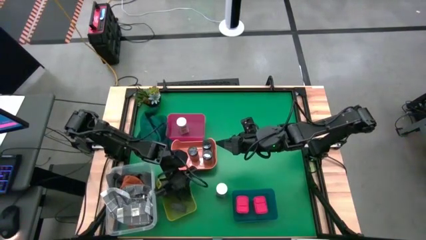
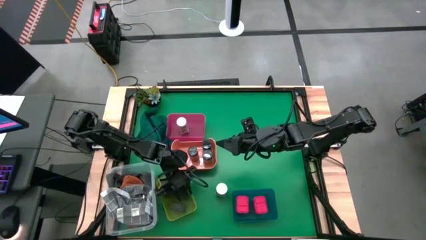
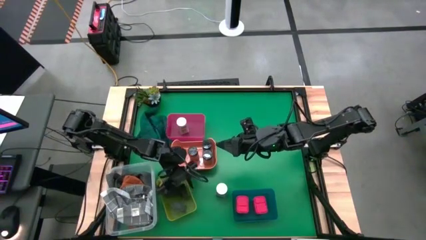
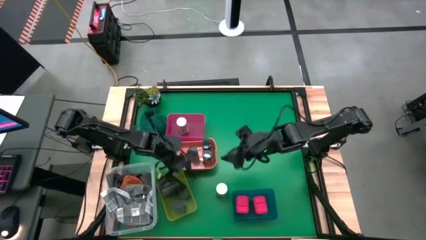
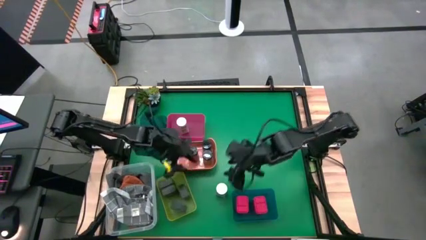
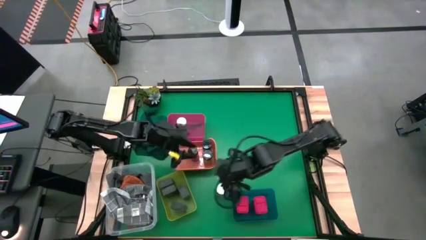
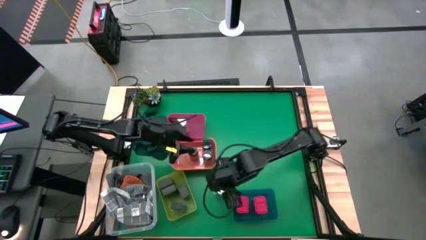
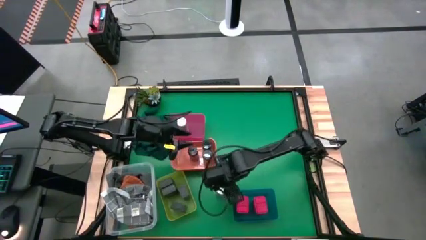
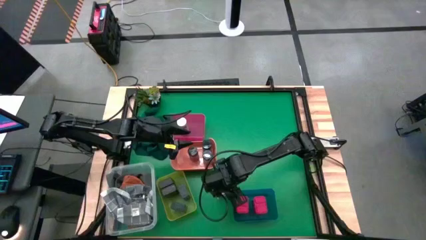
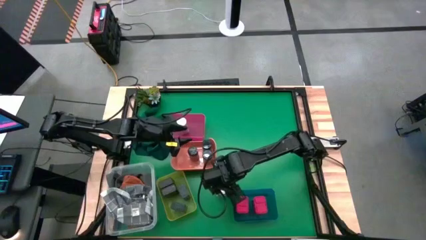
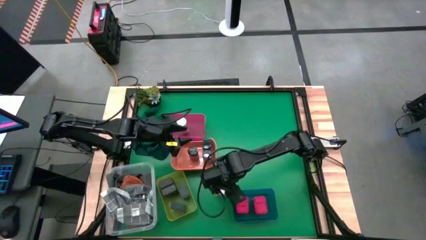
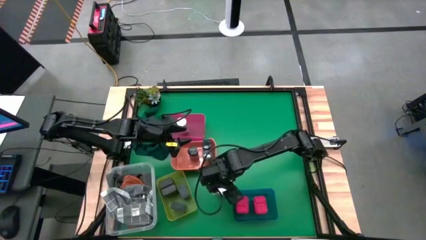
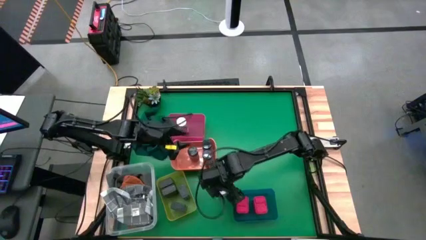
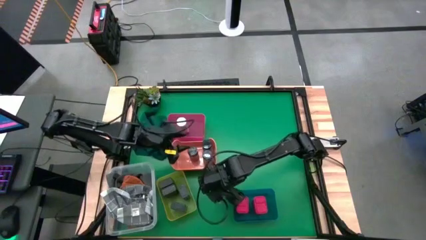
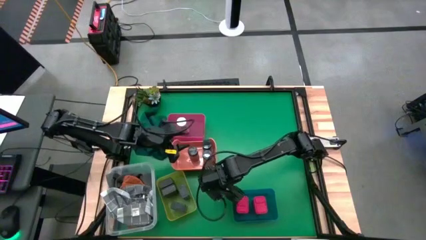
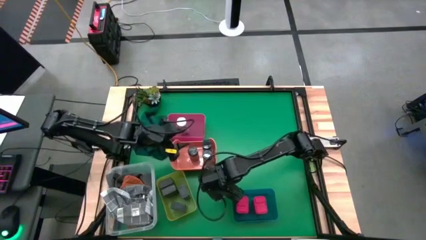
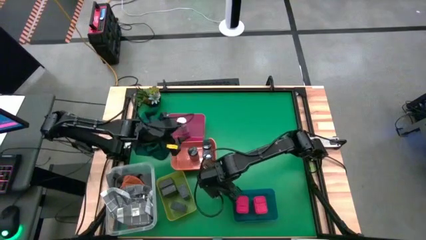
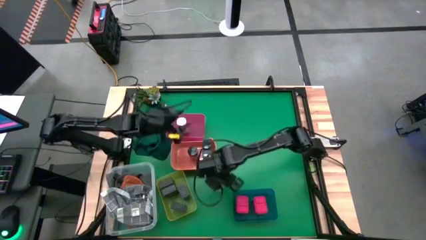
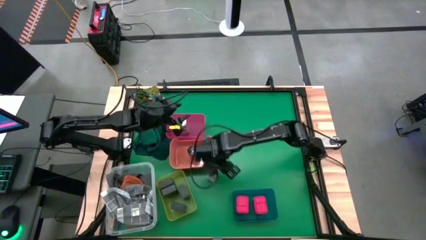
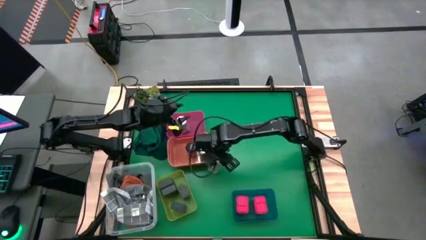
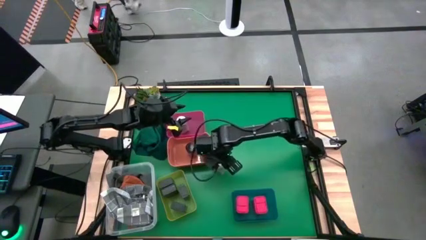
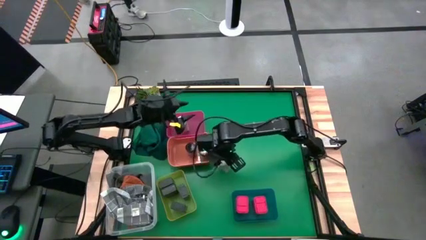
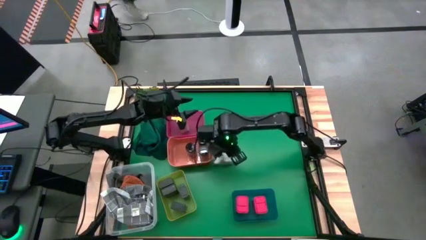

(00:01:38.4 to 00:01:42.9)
Task: Sort spices by type
Put the white seasoning bottle into the red bin

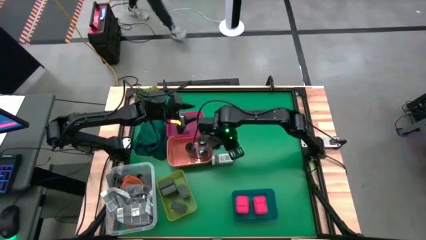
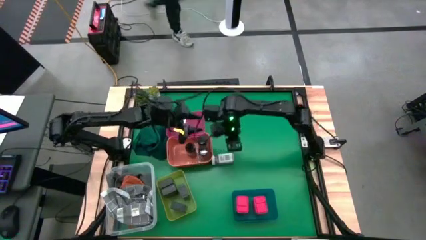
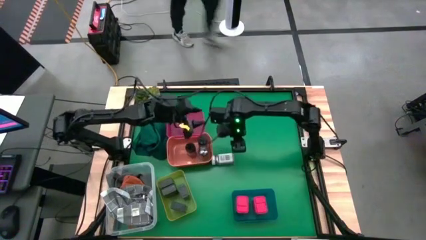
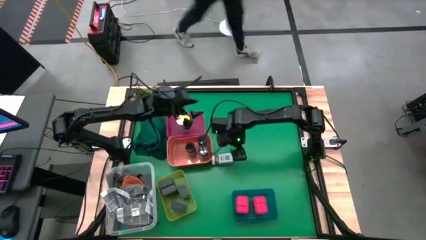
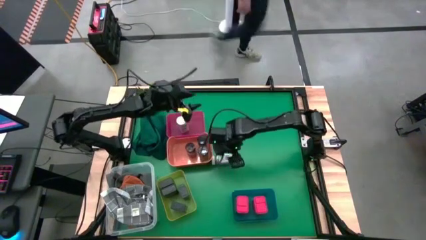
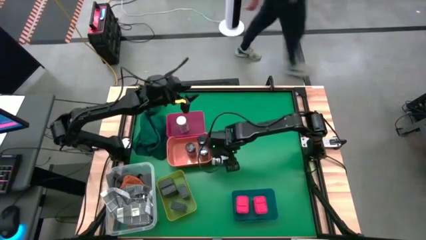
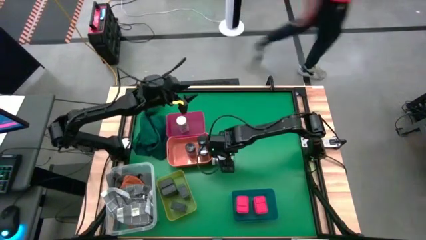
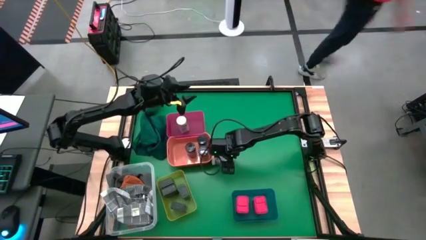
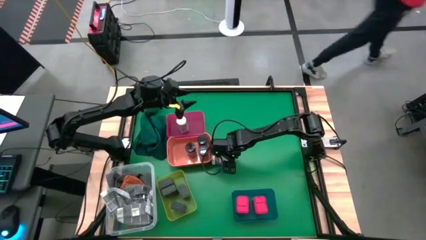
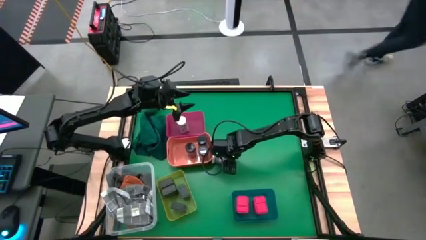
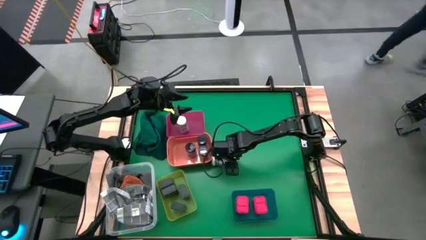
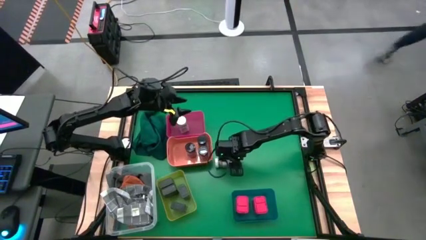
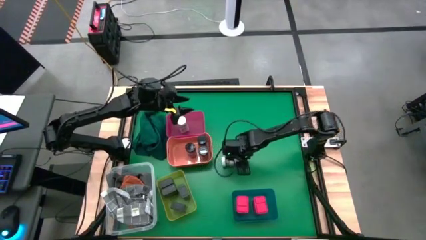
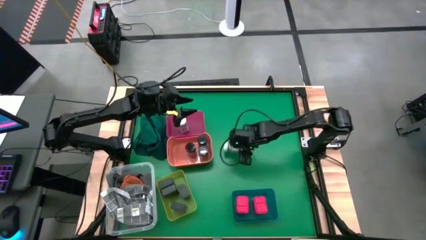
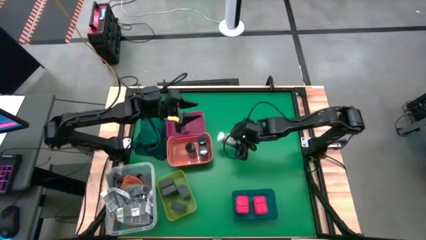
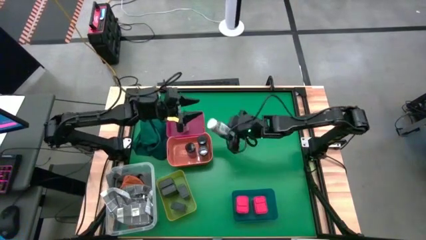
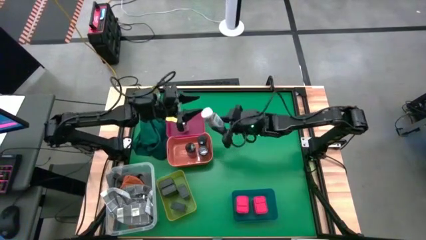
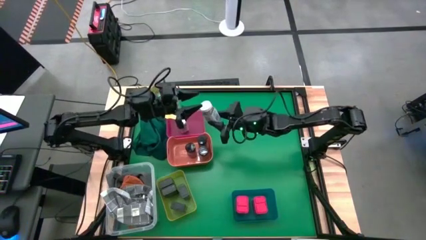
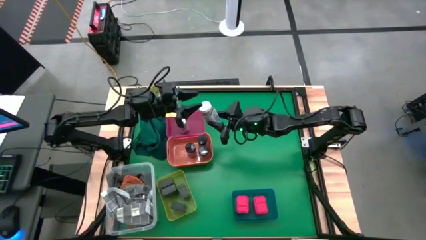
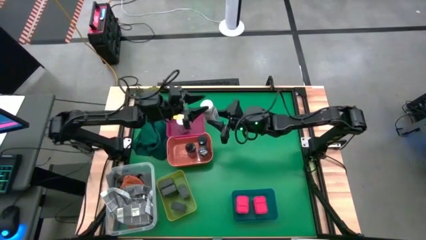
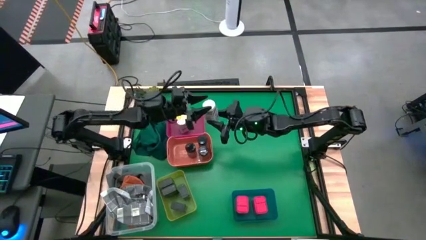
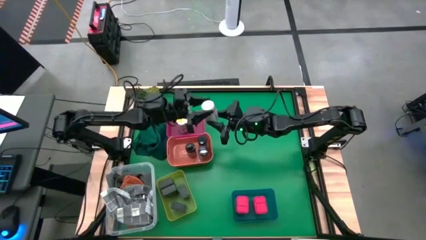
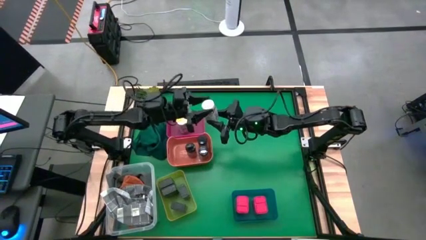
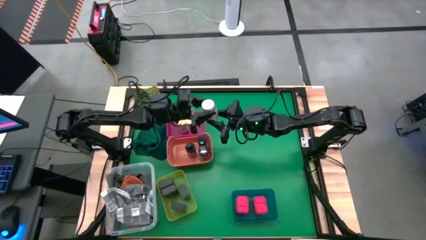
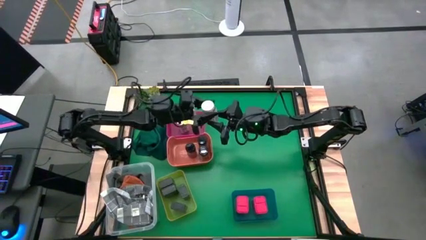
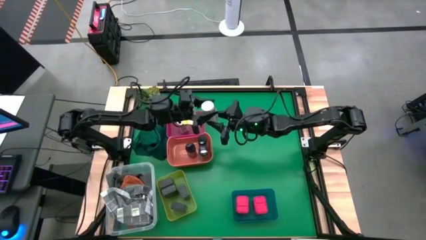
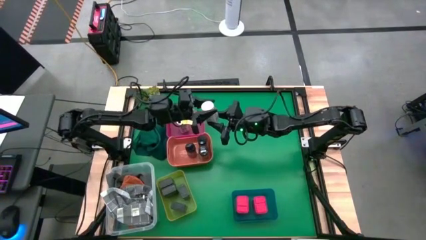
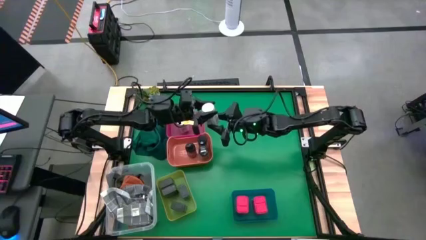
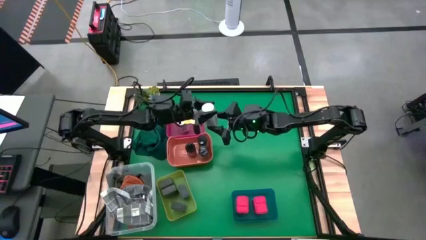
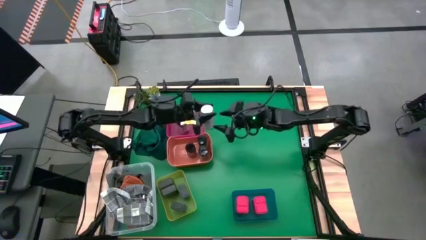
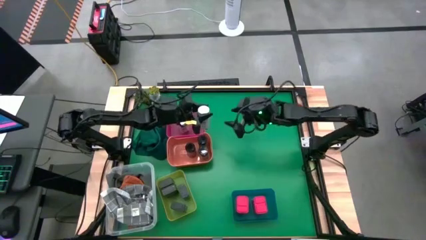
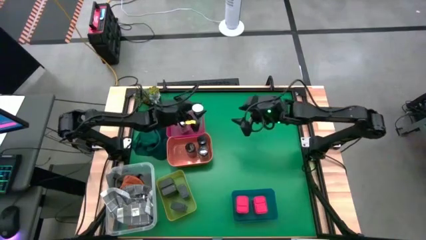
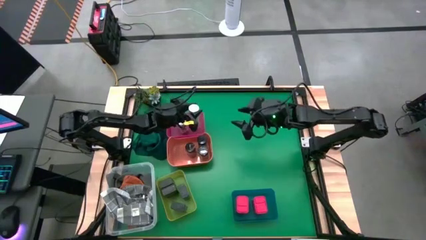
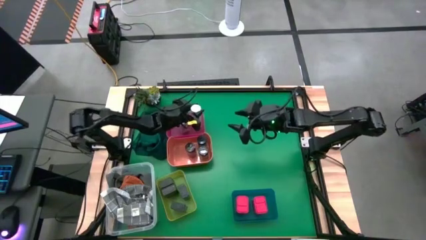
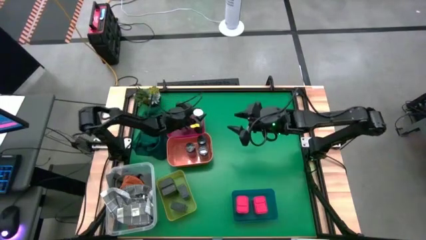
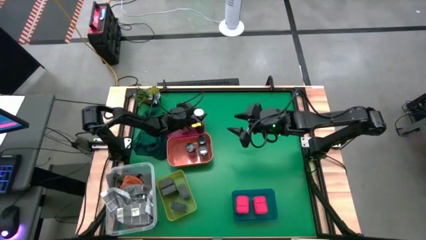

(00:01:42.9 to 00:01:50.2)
Put the white seasoning bottle into the red bin

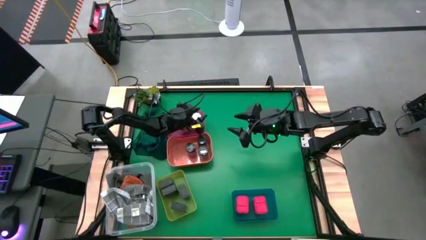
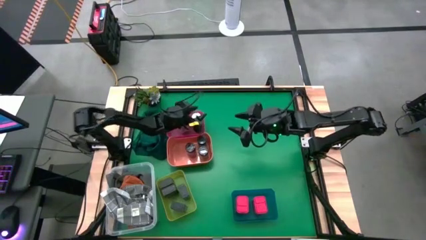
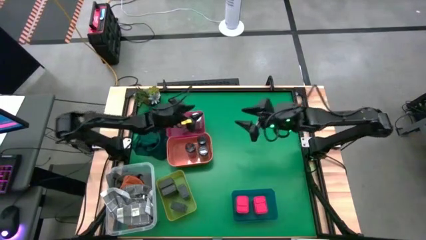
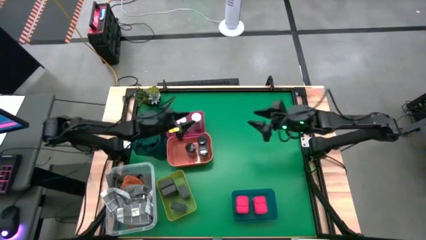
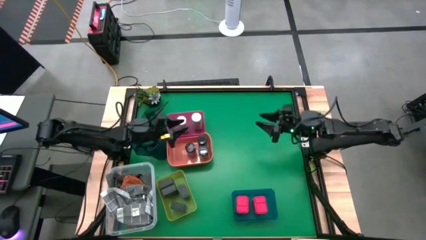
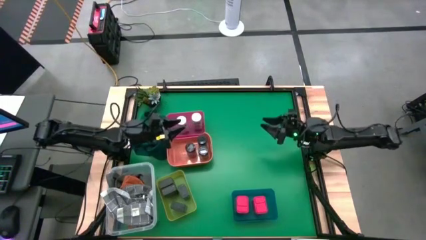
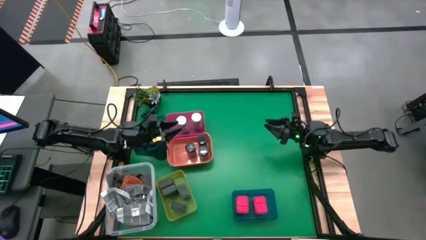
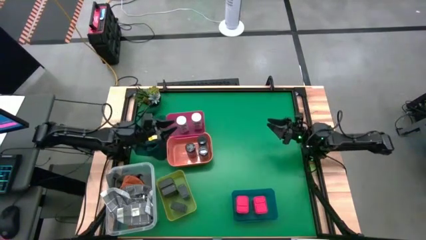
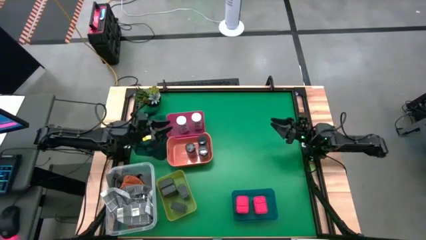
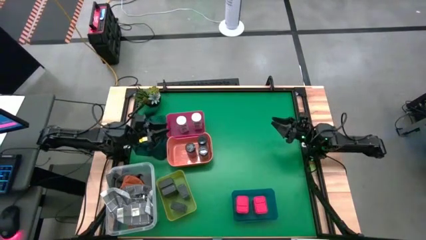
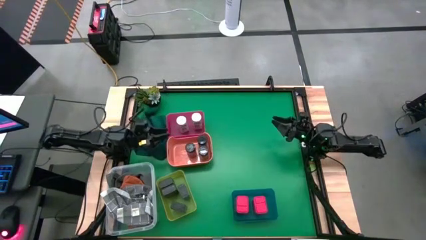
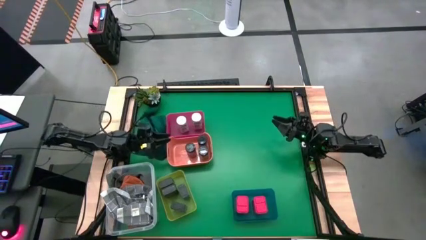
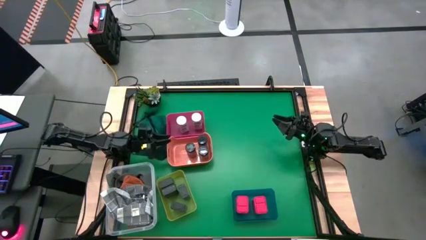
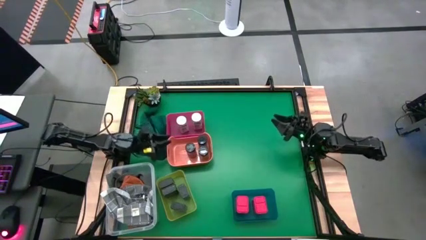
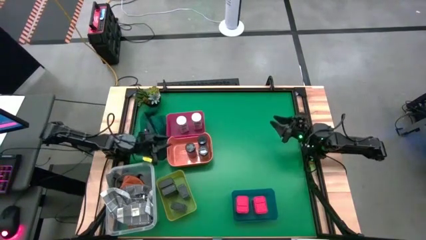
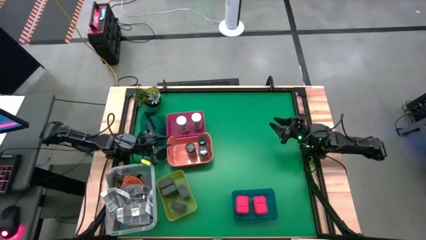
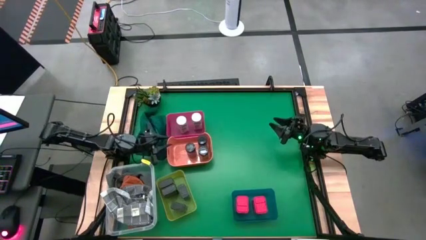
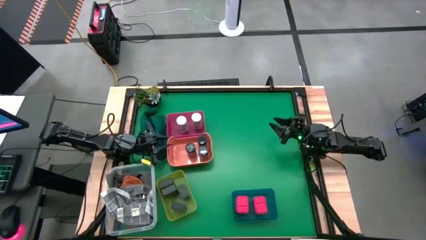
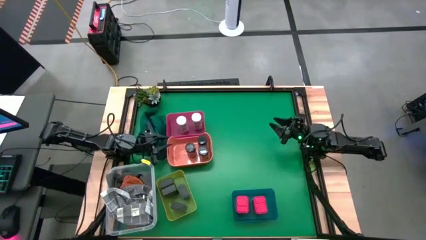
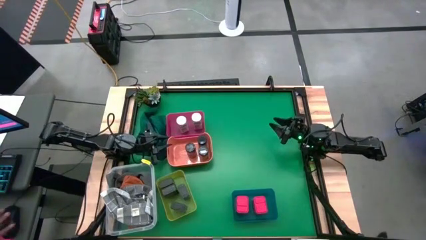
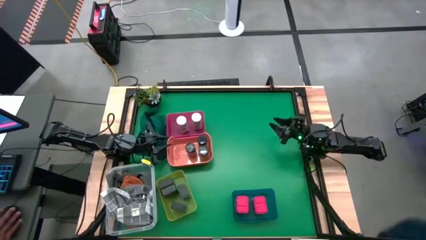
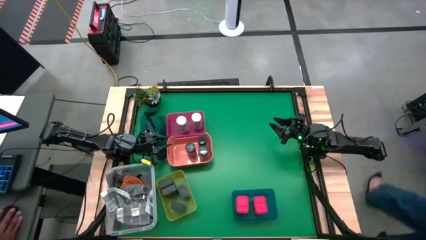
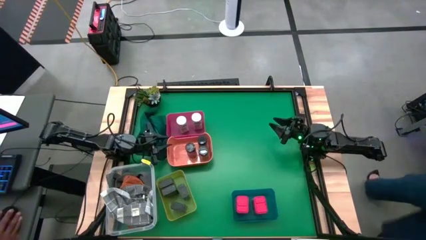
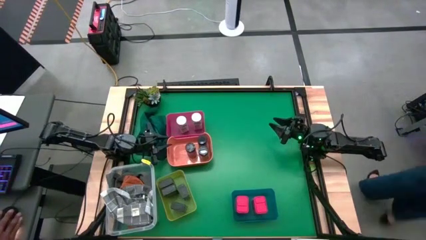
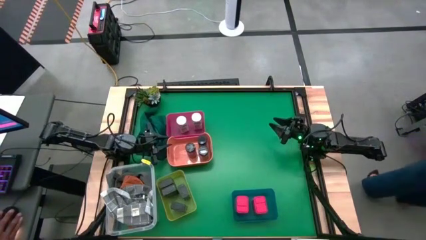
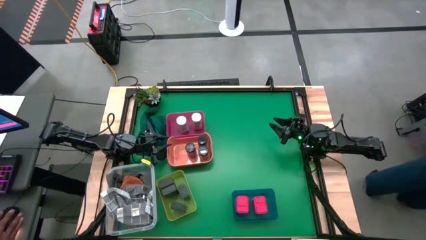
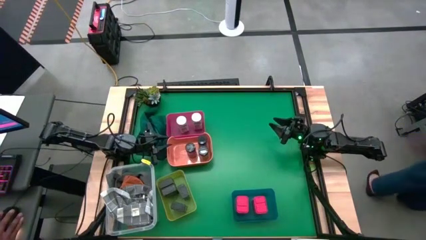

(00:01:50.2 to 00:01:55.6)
Return to Home Position
